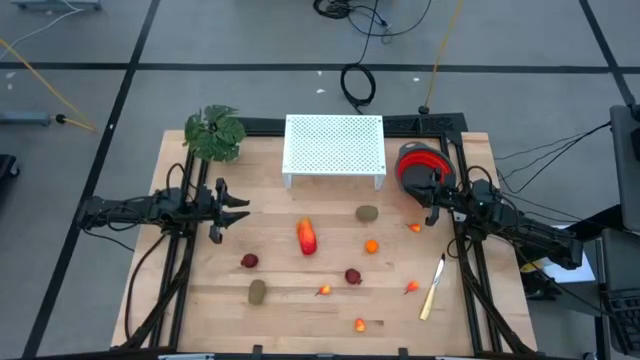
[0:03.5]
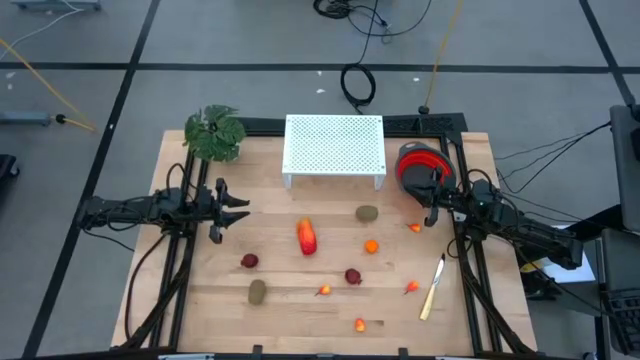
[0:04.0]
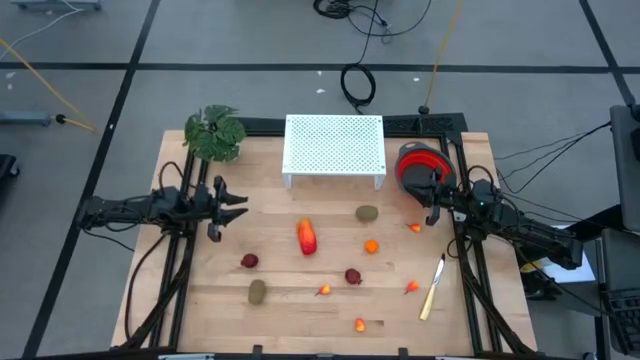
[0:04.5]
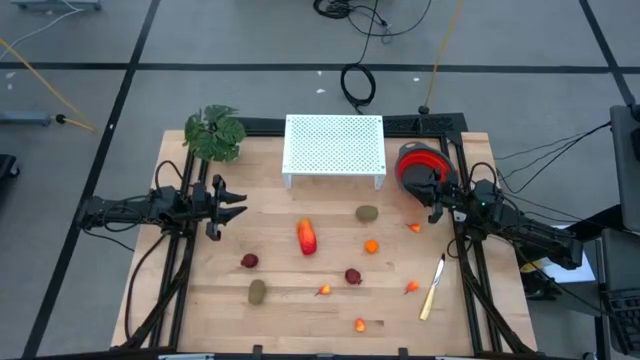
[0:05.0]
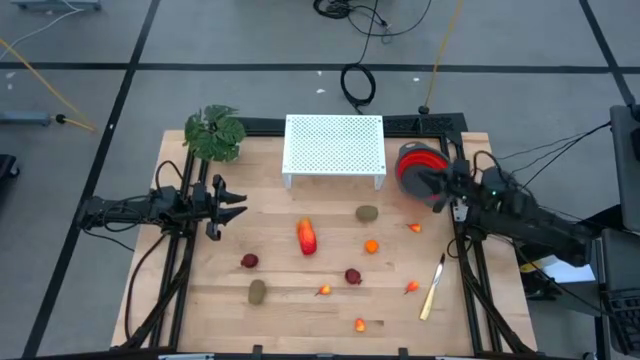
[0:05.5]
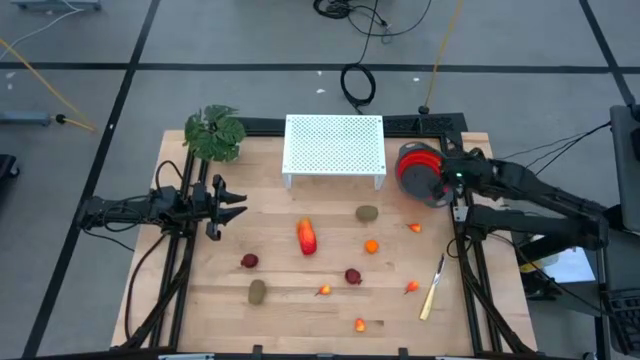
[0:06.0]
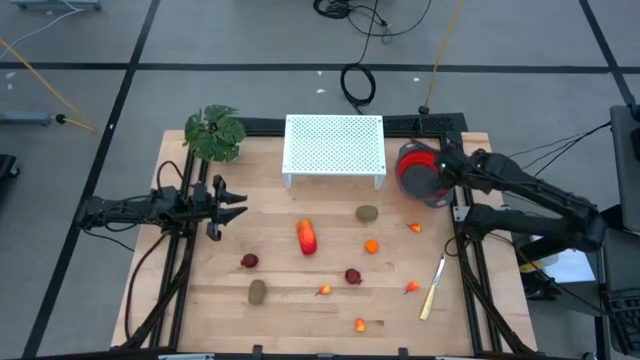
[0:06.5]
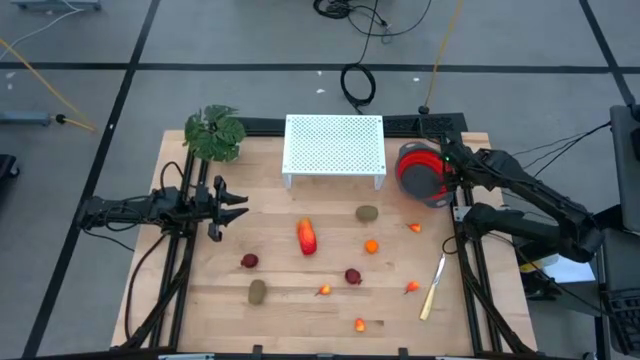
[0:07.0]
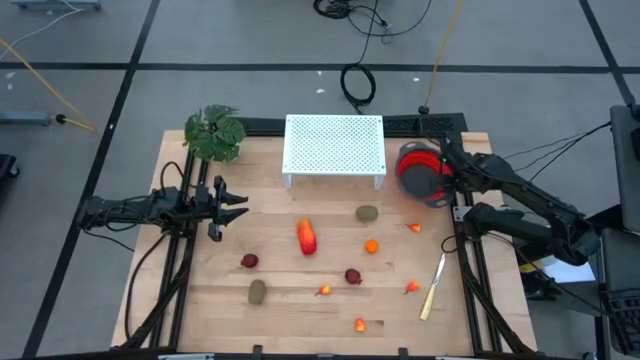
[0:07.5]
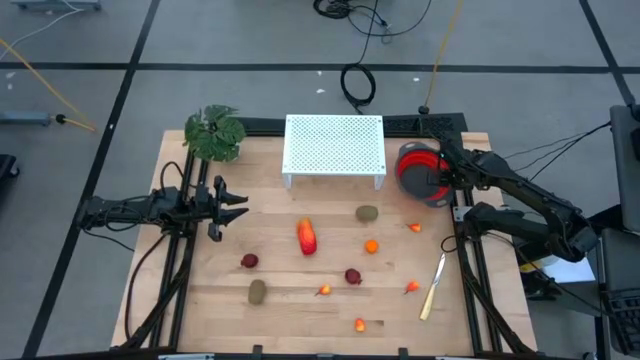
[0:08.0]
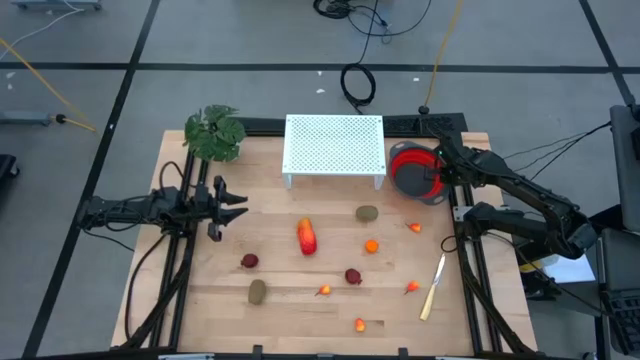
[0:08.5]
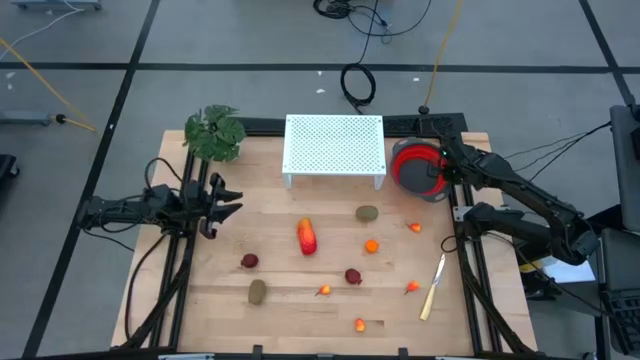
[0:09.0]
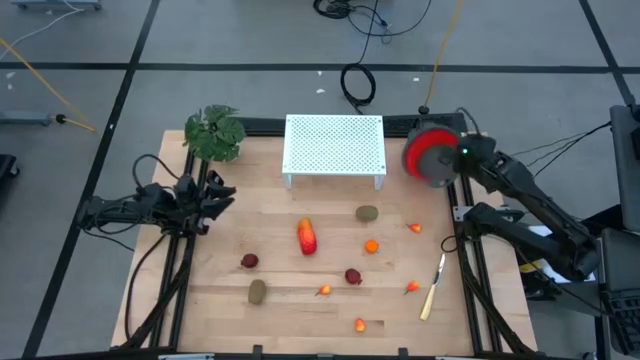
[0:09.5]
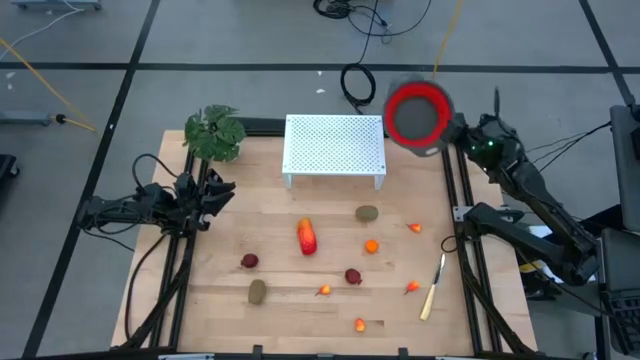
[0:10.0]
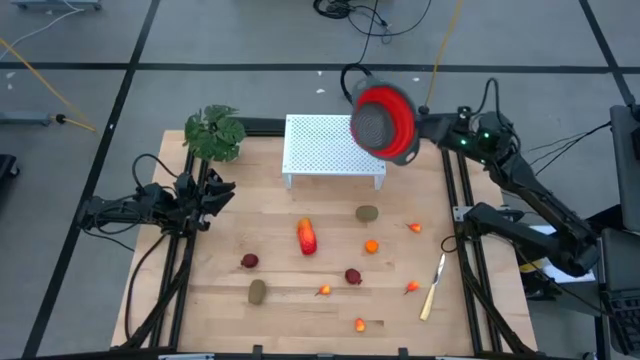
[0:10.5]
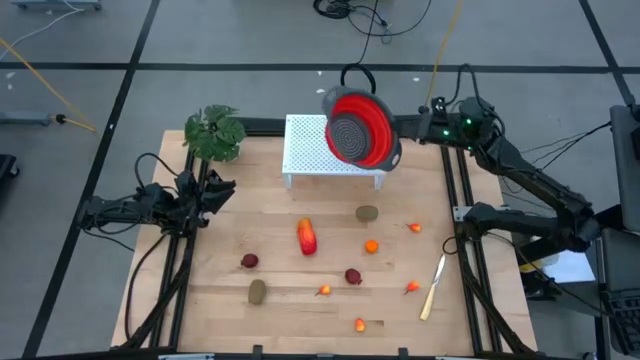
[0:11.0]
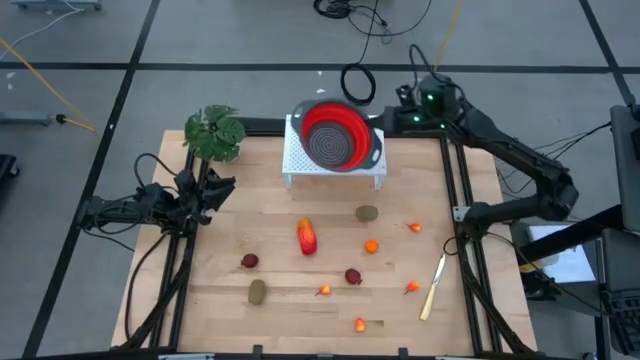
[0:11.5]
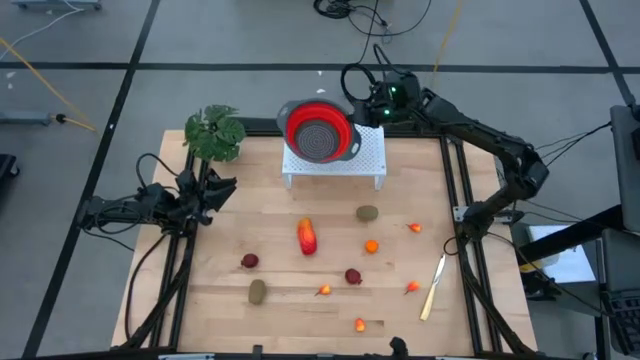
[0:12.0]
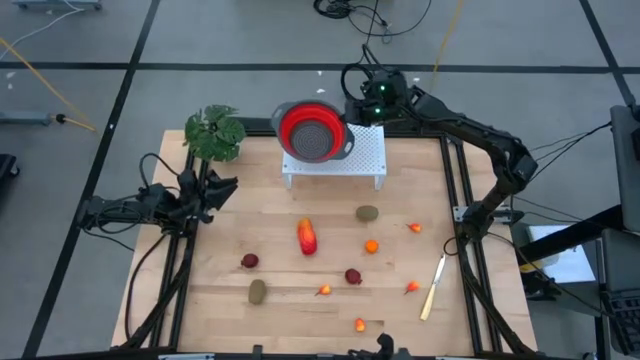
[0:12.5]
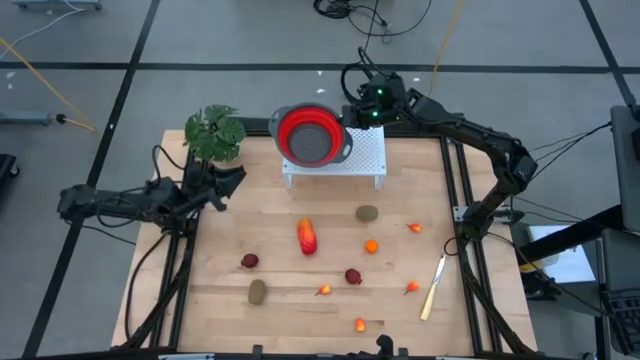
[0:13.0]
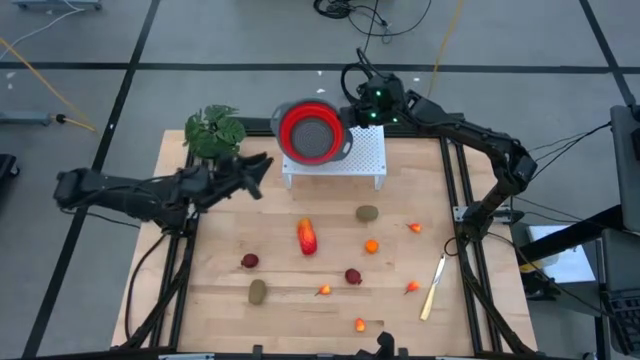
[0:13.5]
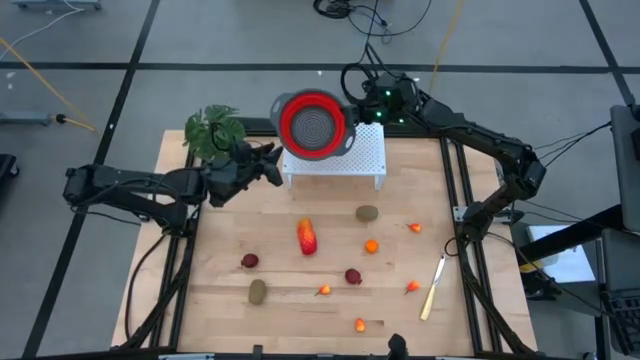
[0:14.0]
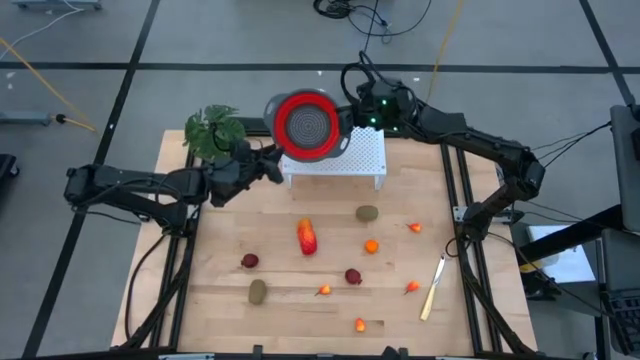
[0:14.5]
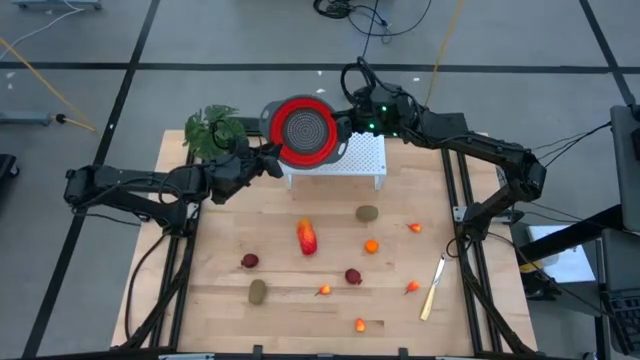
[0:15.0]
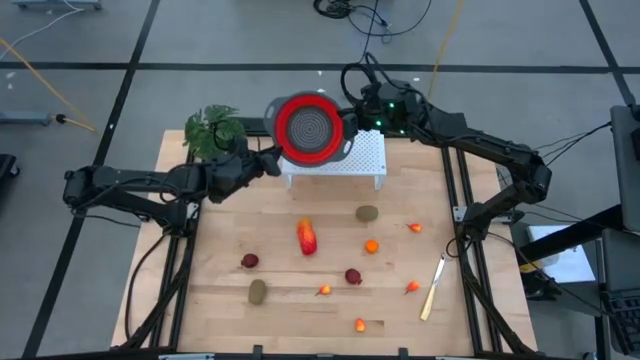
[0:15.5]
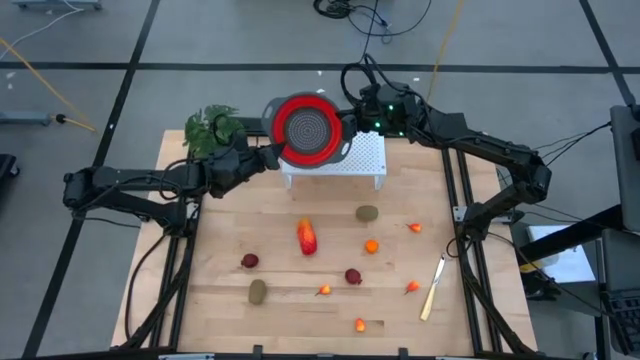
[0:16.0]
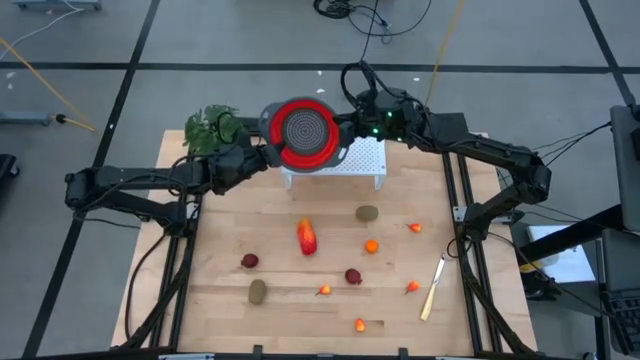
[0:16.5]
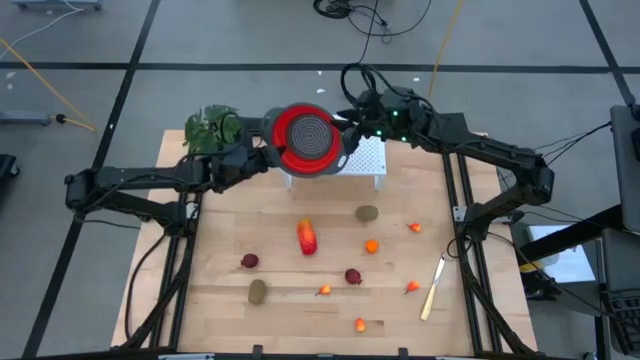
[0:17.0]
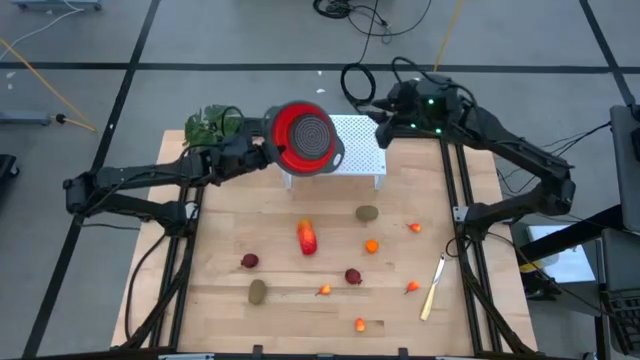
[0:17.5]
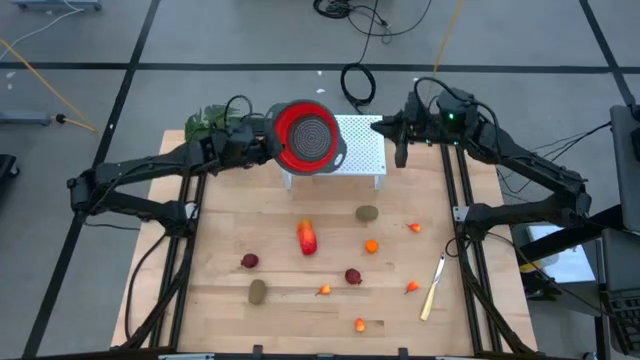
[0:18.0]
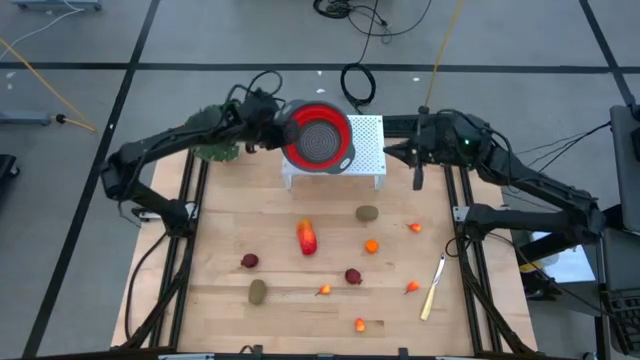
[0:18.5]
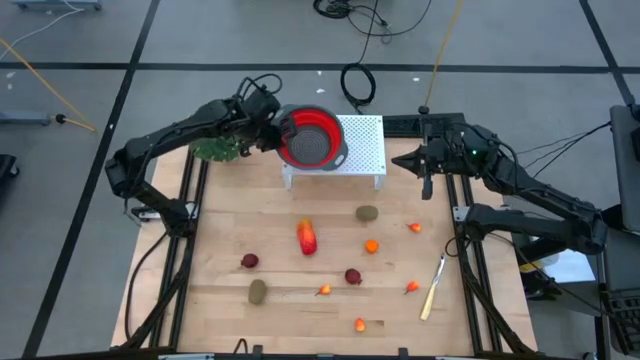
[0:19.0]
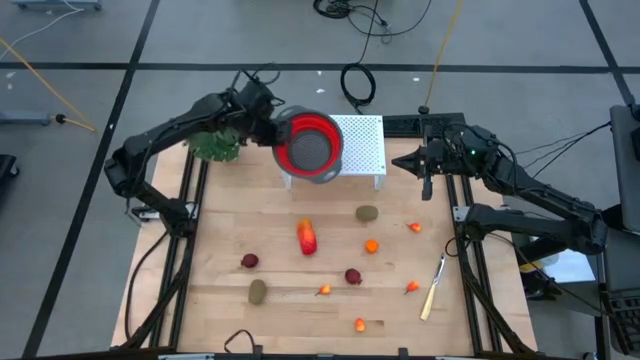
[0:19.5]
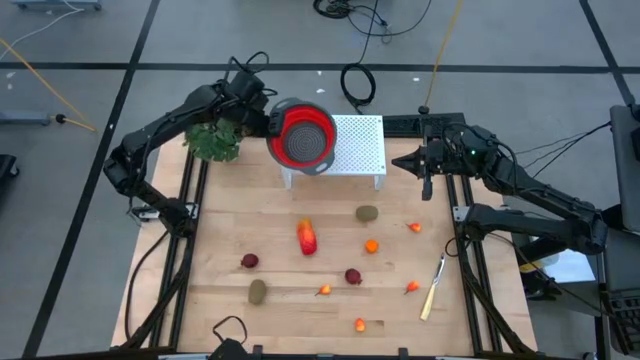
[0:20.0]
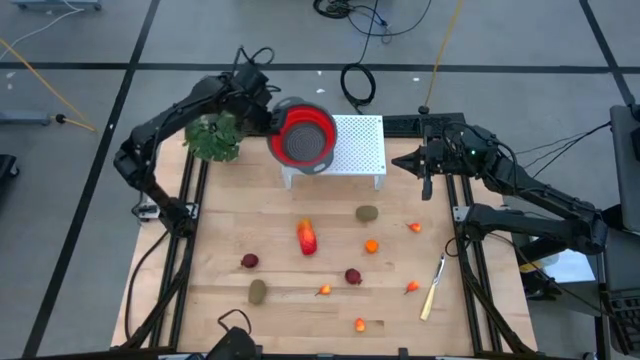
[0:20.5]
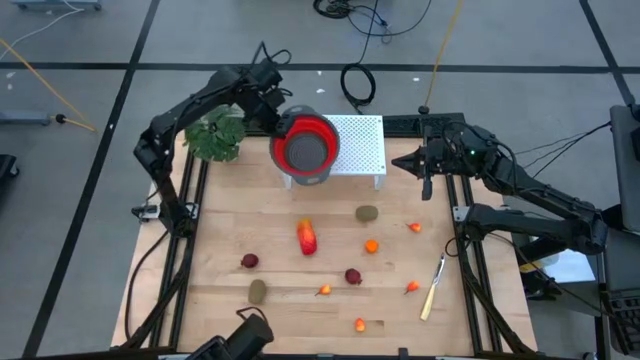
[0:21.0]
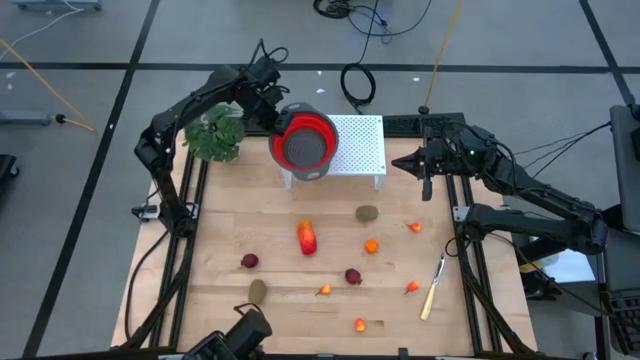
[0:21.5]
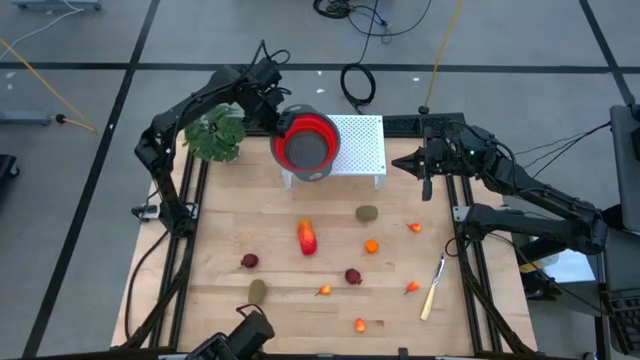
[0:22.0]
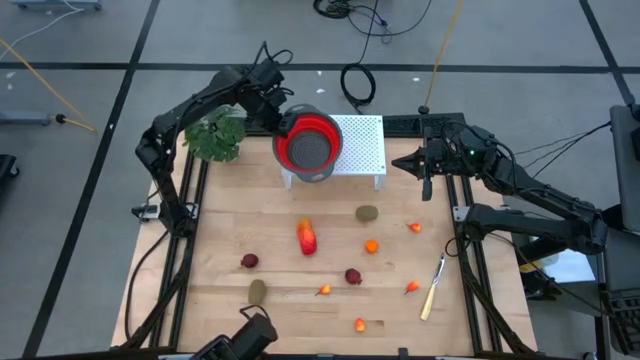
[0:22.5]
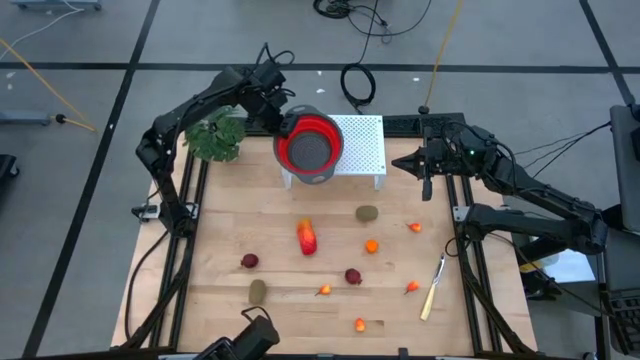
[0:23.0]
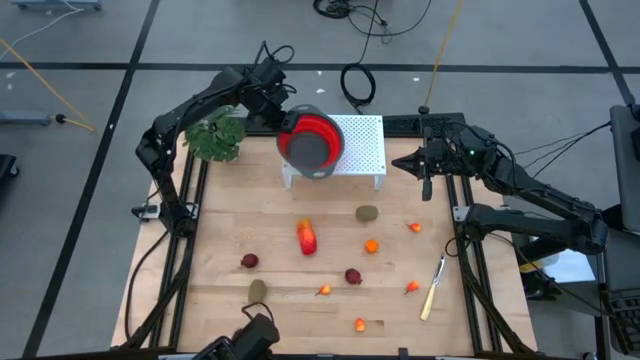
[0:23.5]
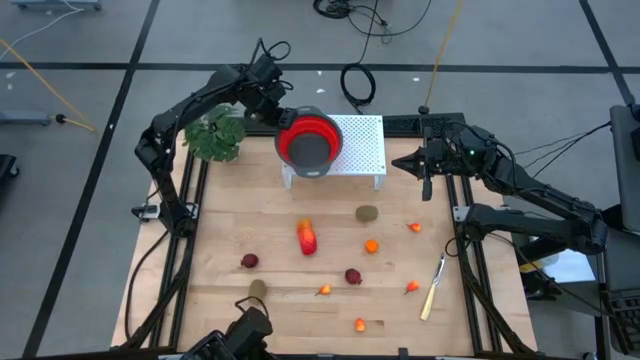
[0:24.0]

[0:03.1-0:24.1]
Task: Pick & Place Fruit
Put the red strainer bowl on the shelf
